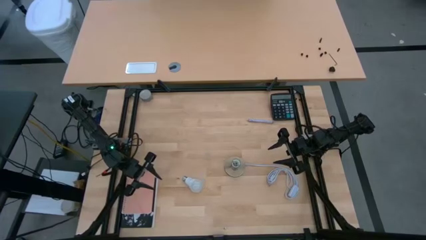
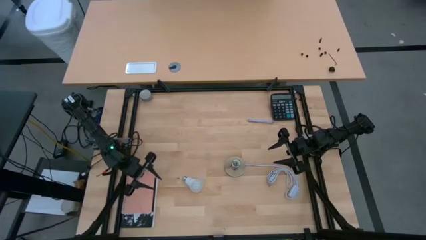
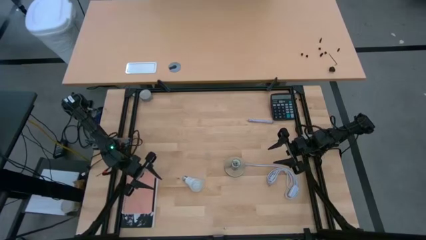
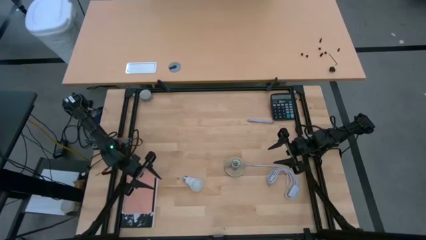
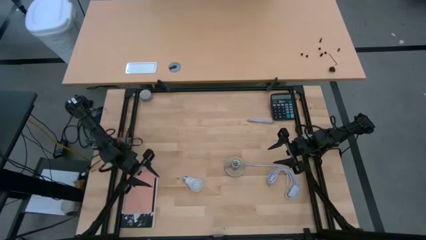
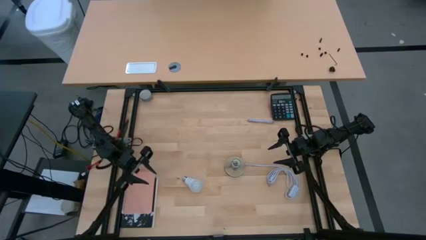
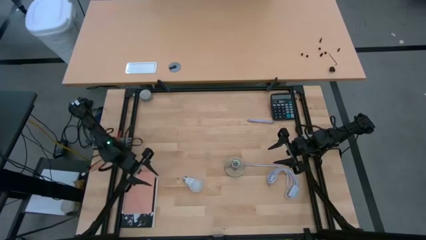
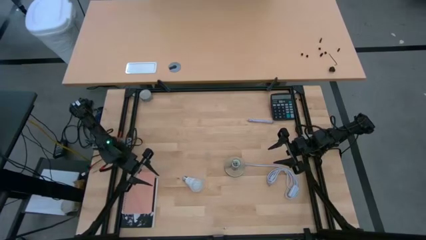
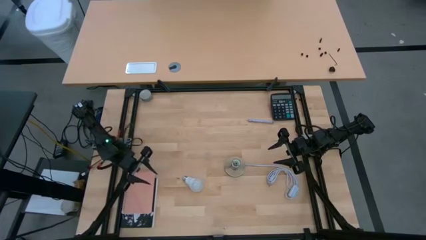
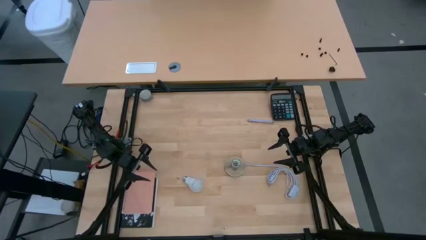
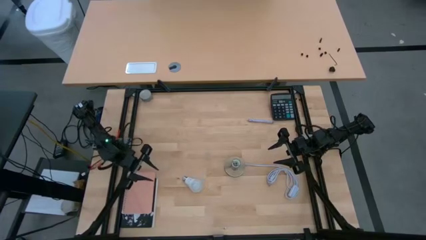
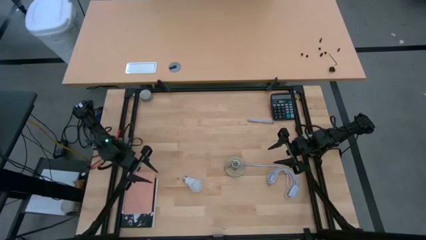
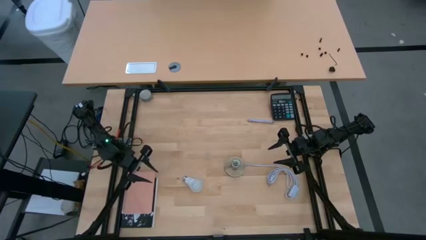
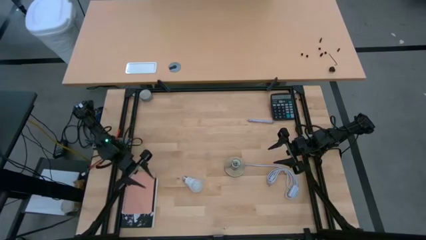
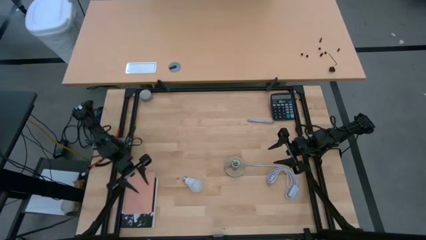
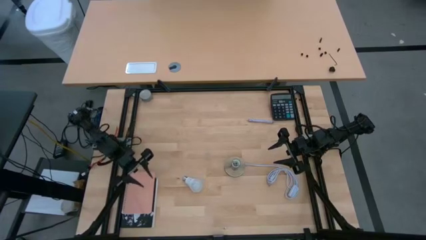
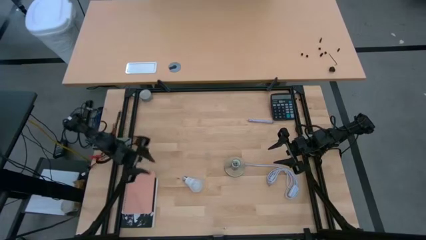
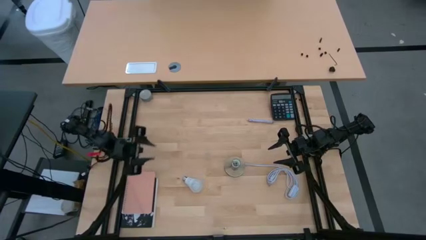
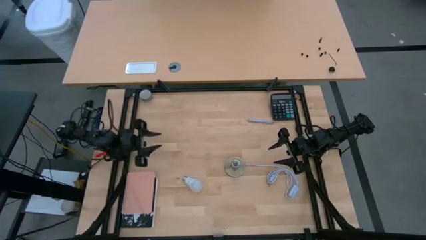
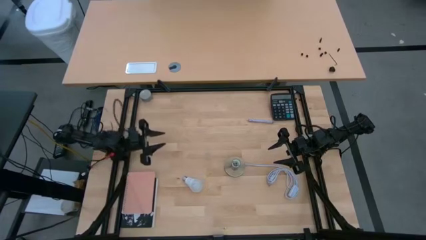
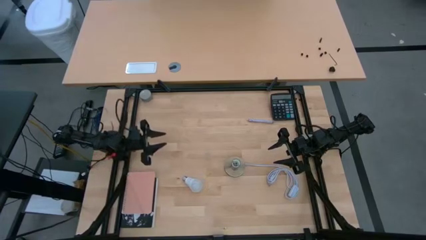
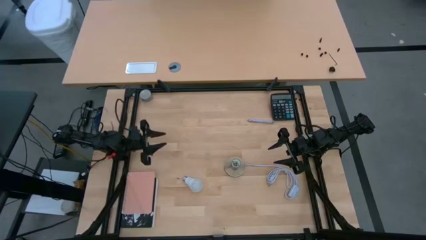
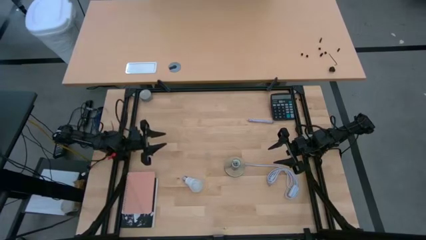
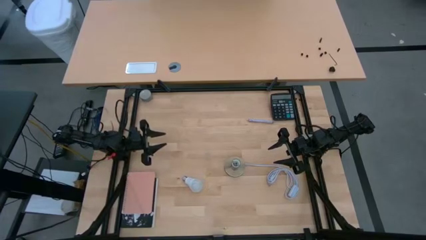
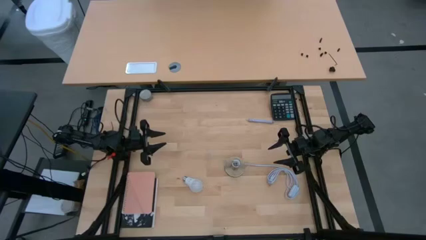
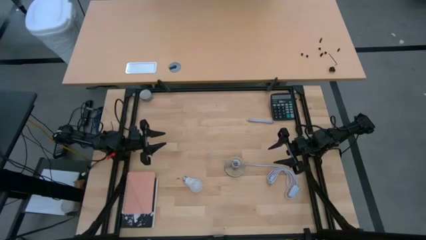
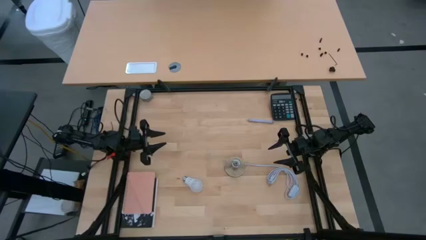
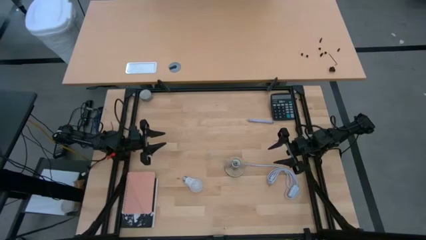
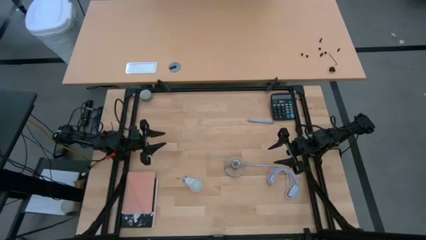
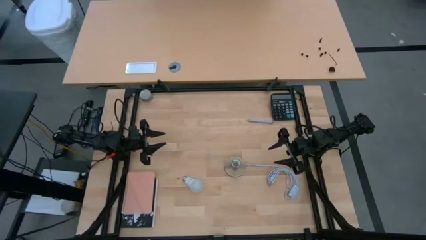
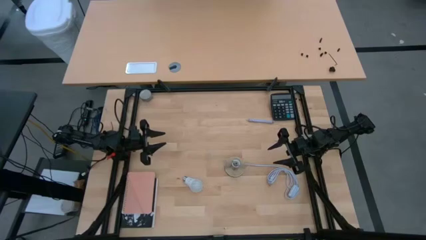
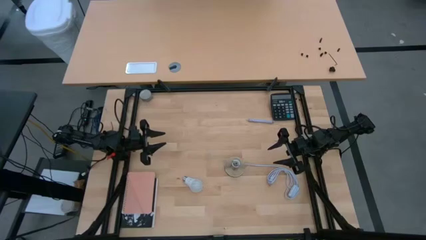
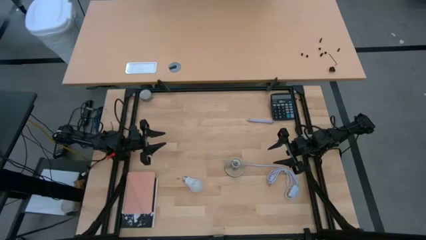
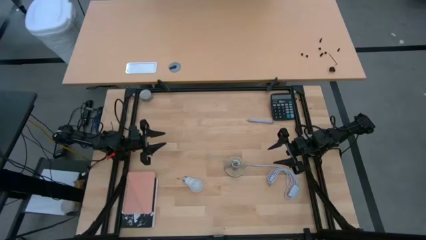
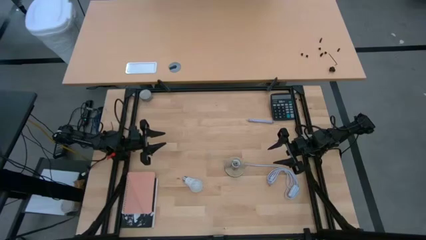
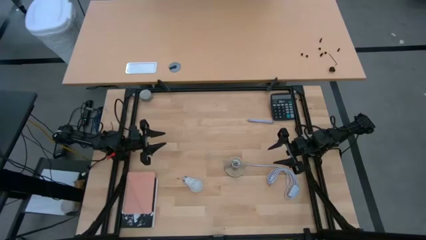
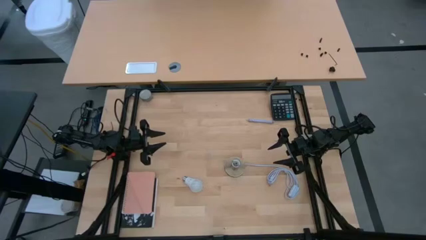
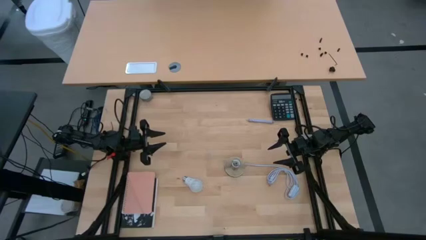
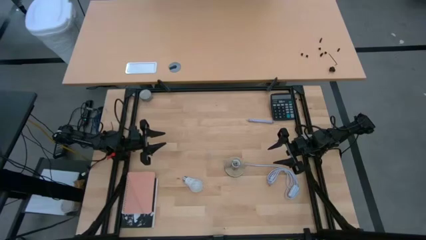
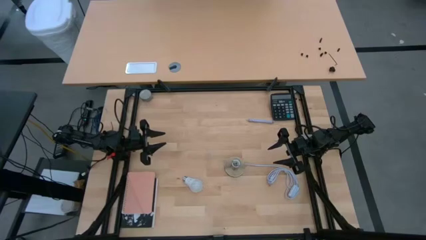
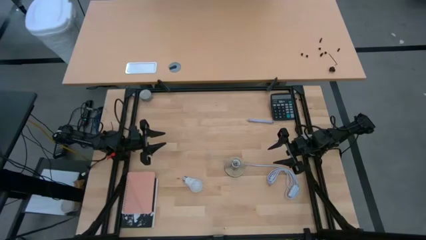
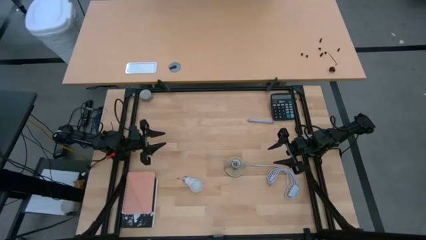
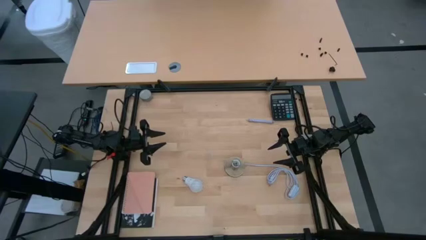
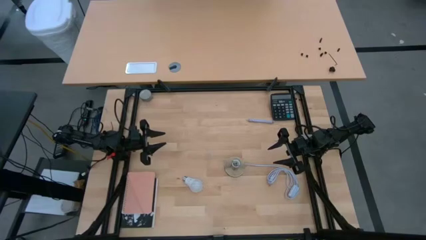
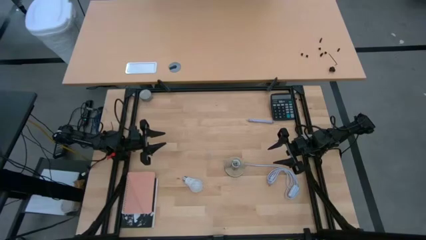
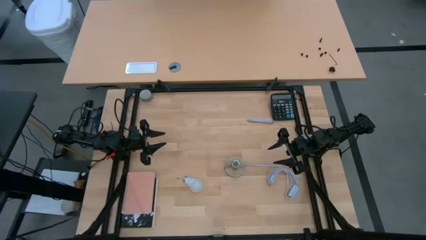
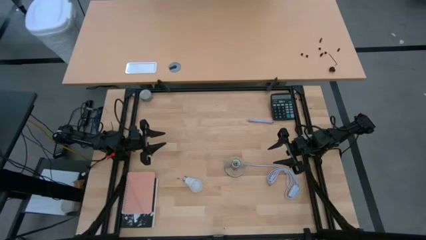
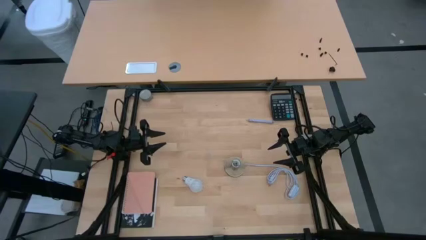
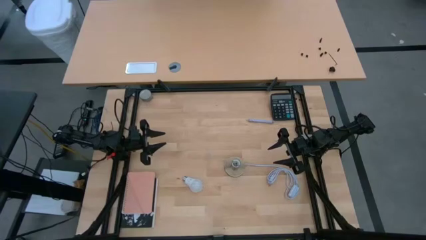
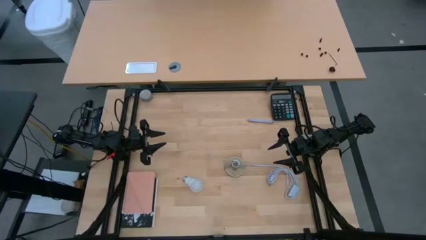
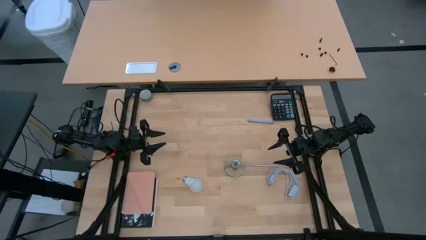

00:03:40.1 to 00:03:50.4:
Task: Screw lightbulb
Return to Home Position
